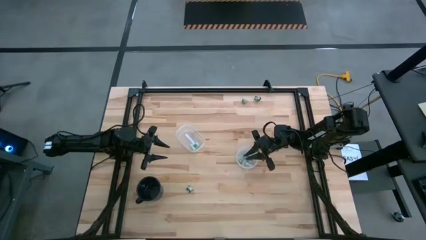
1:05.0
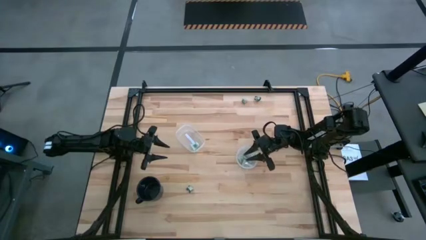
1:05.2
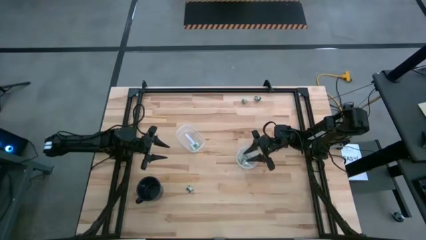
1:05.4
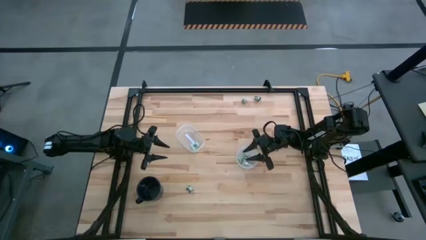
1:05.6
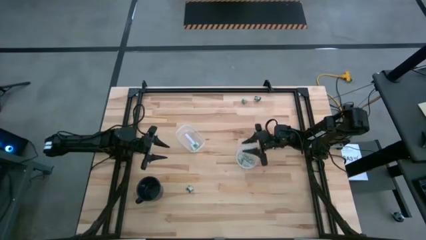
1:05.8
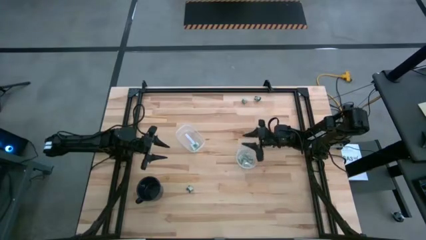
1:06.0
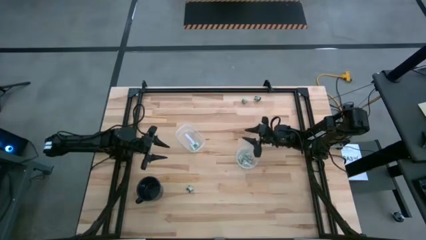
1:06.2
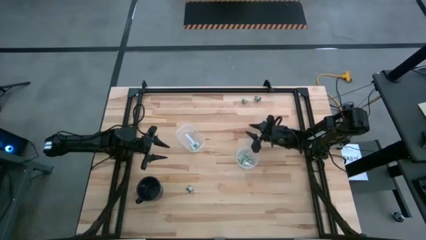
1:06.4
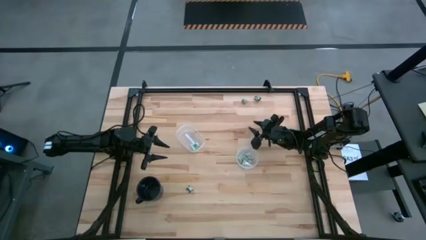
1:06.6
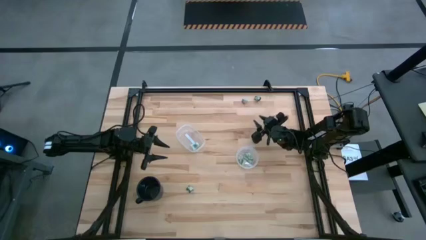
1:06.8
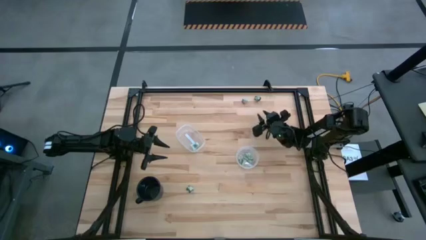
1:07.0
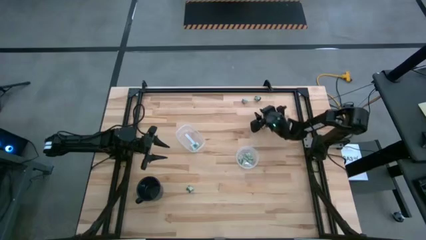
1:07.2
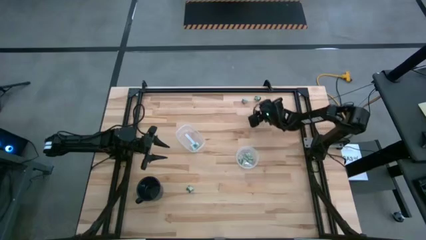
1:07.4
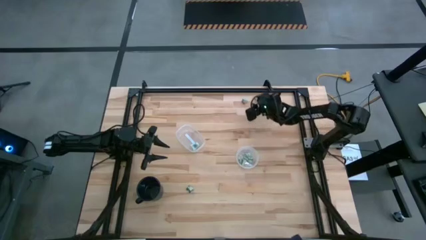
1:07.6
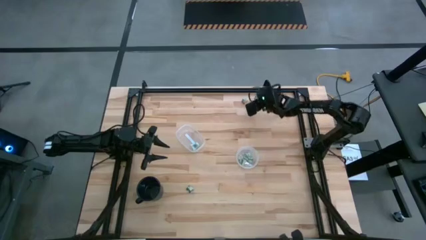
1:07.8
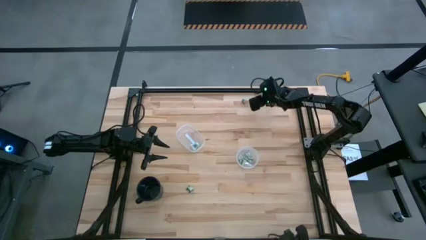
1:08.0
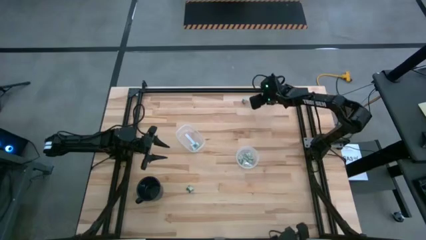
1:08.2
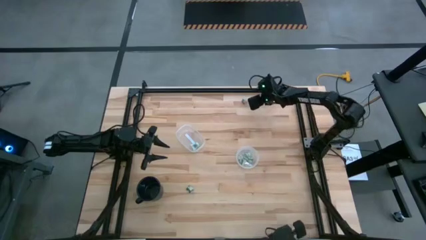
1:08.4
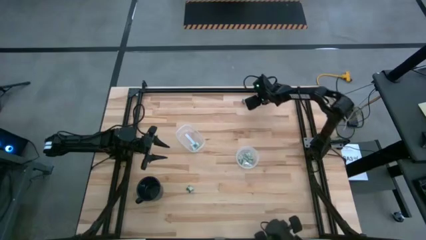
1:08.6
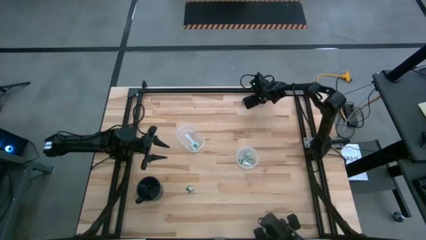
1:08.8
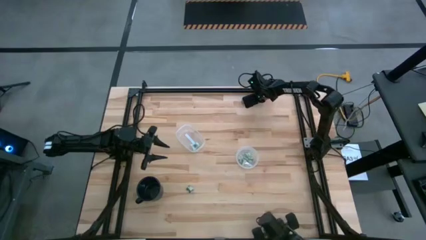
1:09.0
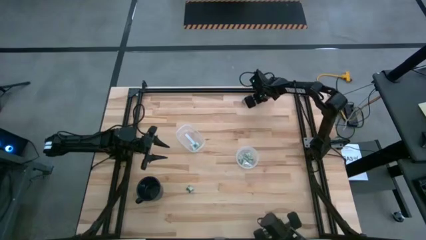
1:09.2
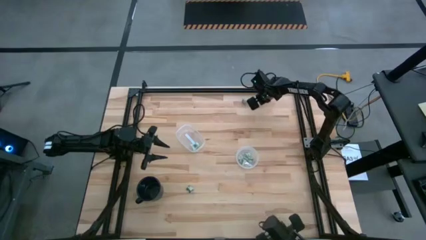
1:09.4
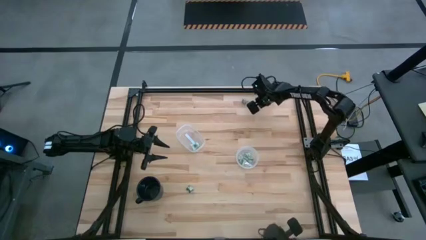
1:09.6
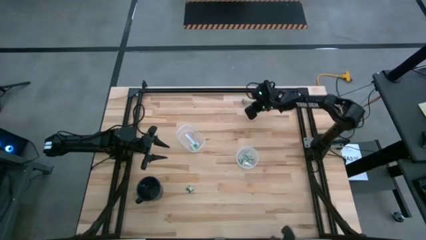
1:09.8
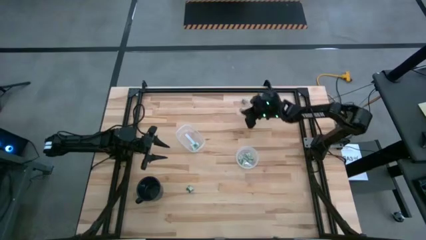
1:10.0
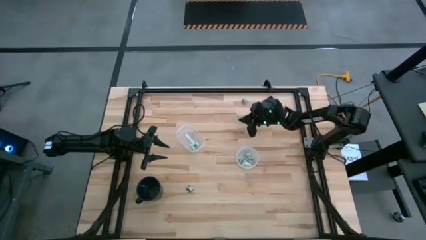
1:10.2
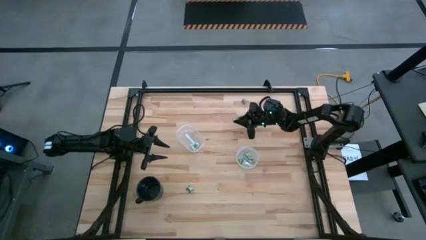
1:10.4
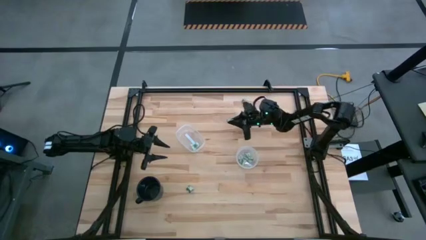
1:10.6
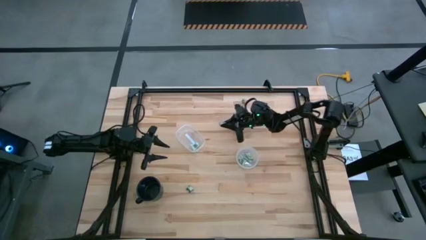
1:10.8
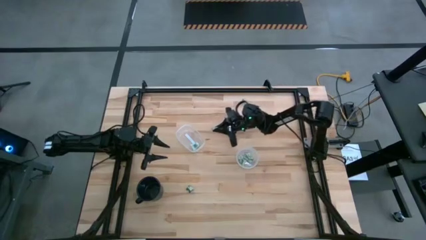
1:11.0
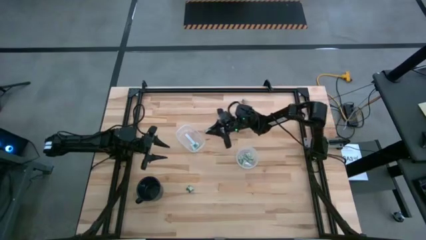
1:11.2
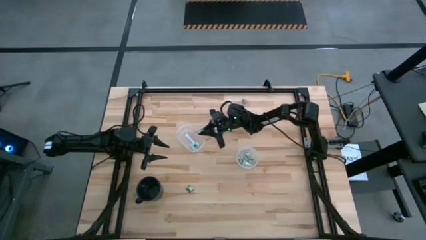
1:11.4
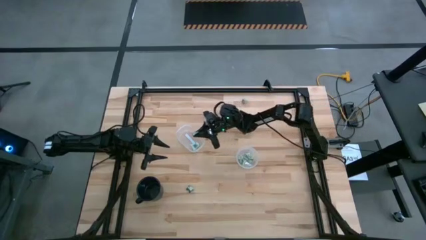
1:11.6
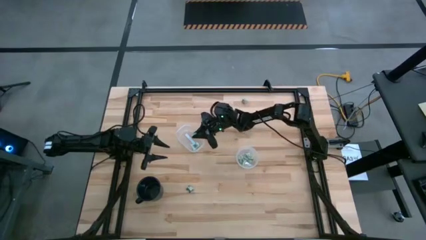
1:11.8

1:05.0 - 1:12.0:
Task: Pick and place Stevia / Truvia into bins
Put the top green stevia packet into the left transparent container

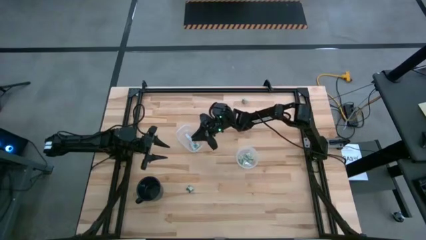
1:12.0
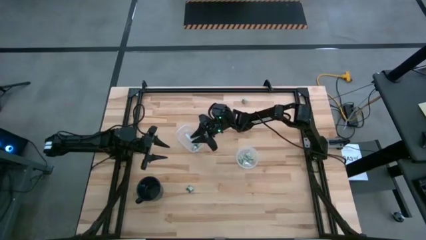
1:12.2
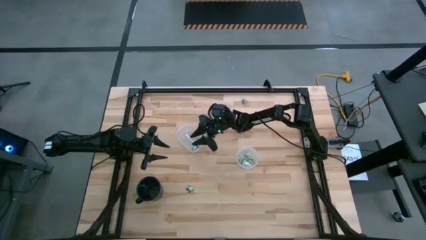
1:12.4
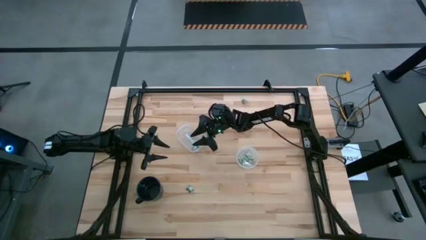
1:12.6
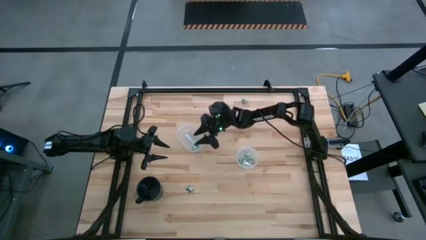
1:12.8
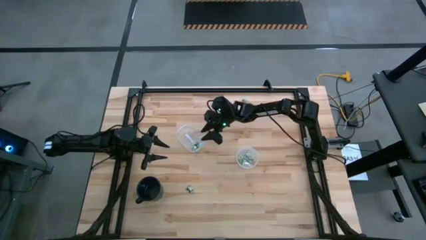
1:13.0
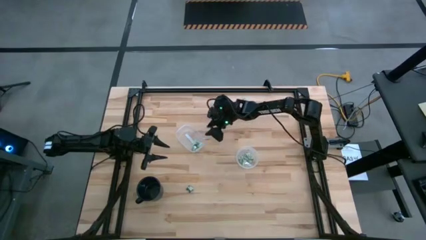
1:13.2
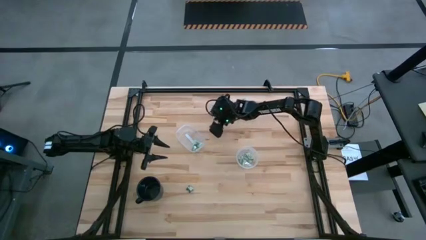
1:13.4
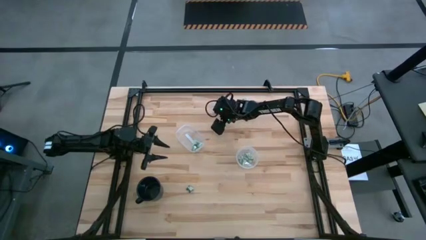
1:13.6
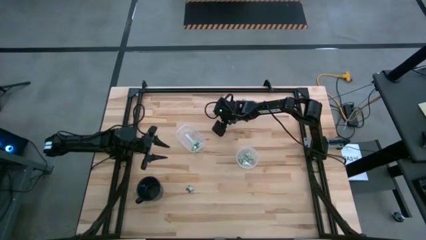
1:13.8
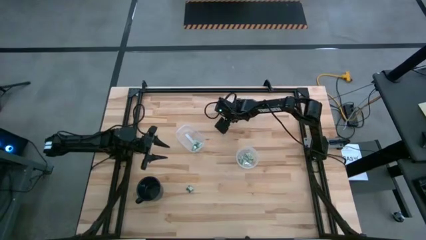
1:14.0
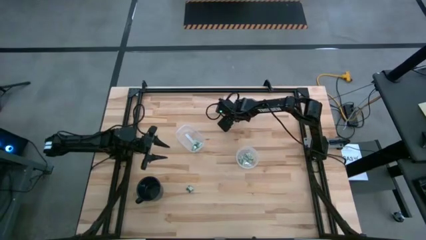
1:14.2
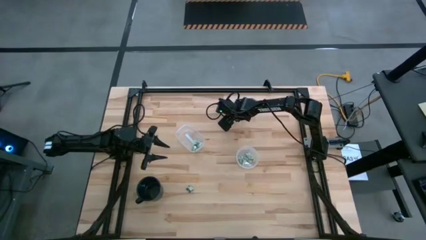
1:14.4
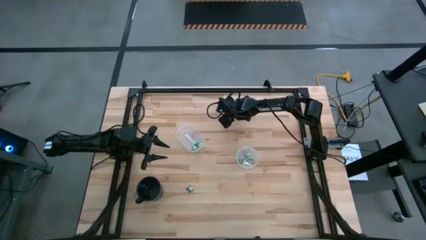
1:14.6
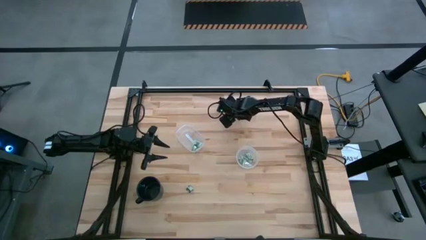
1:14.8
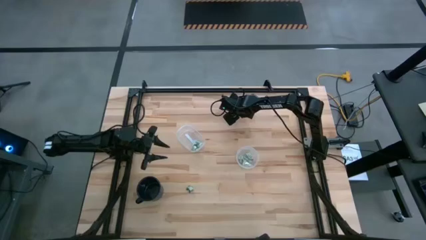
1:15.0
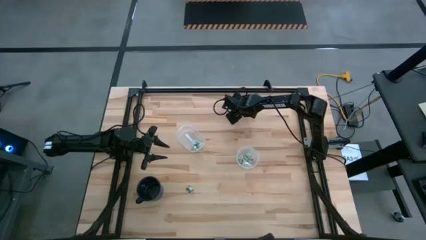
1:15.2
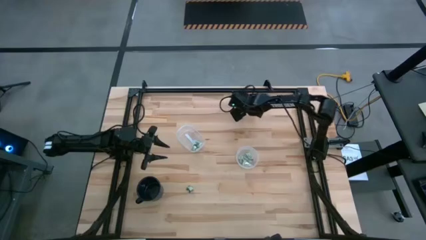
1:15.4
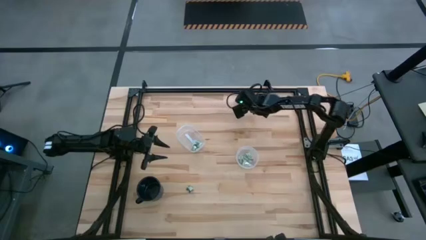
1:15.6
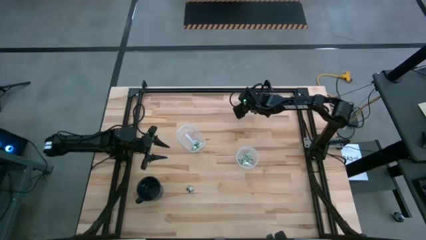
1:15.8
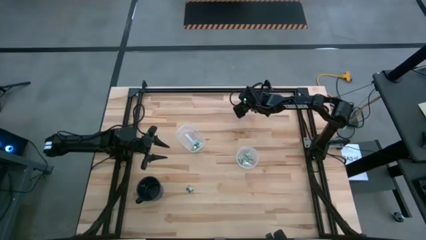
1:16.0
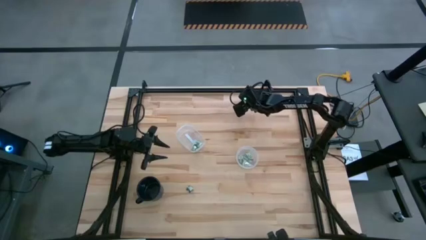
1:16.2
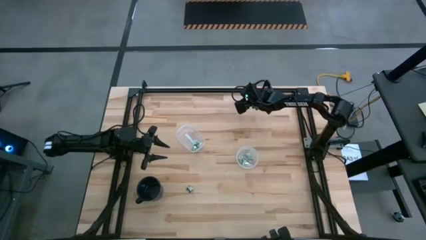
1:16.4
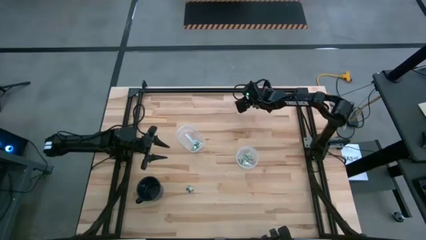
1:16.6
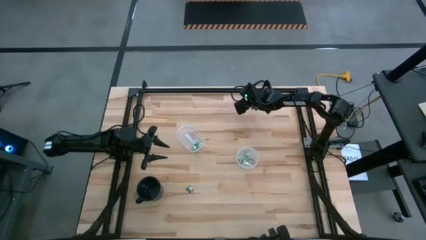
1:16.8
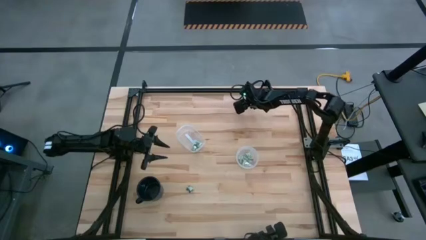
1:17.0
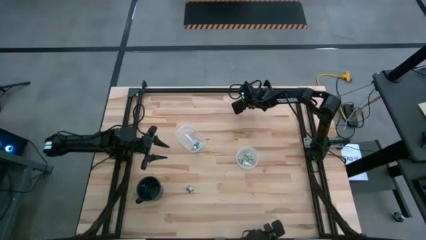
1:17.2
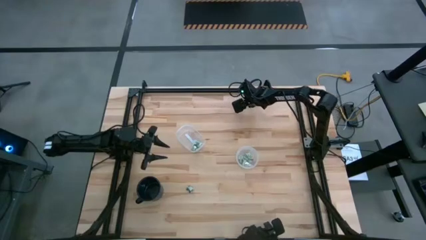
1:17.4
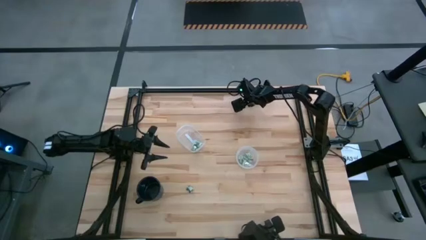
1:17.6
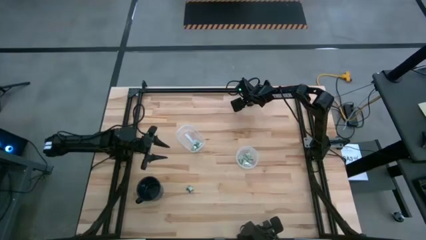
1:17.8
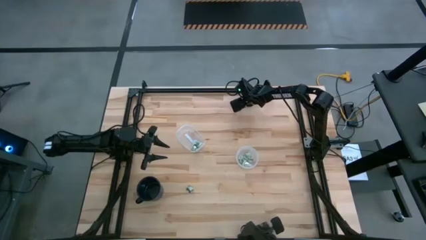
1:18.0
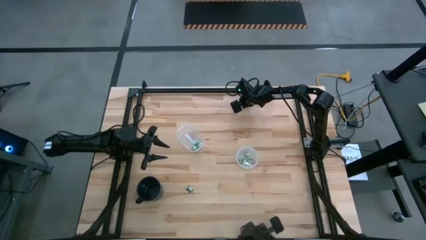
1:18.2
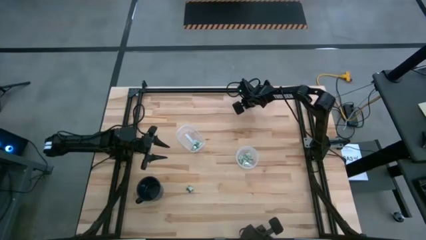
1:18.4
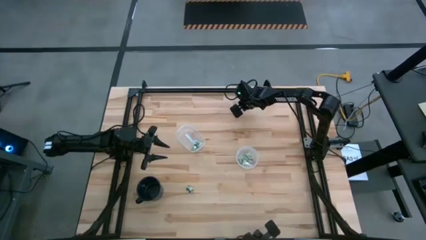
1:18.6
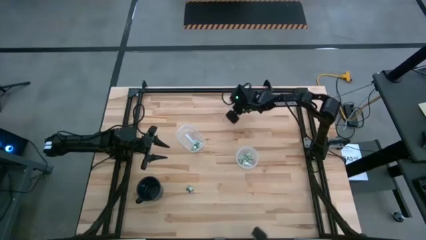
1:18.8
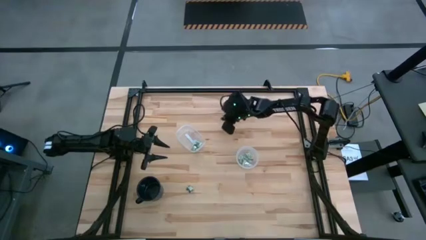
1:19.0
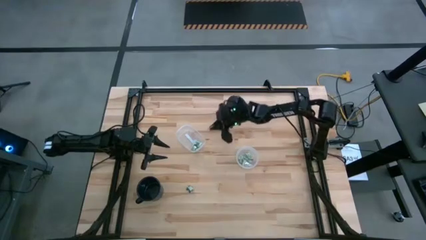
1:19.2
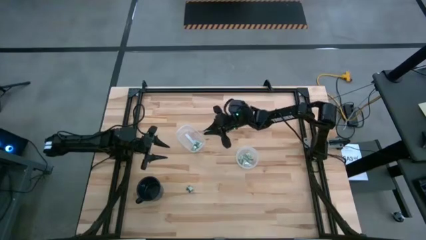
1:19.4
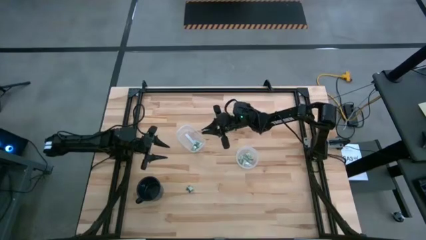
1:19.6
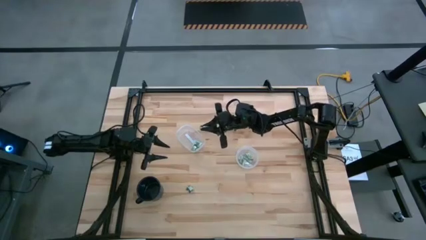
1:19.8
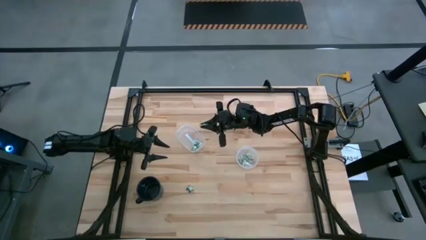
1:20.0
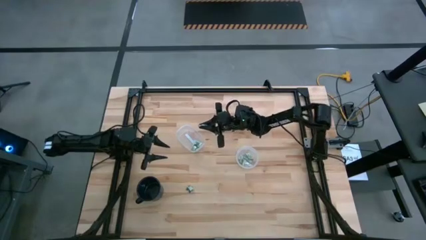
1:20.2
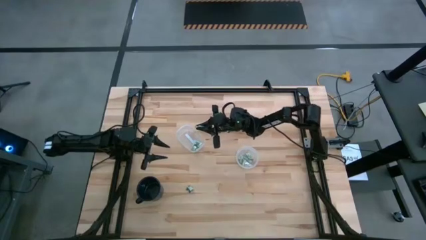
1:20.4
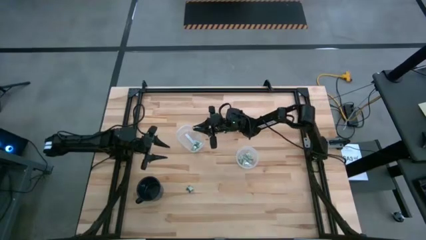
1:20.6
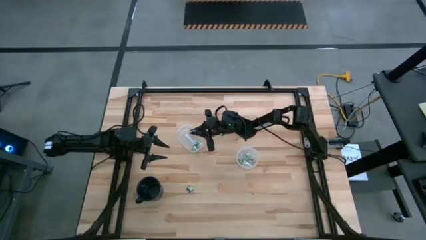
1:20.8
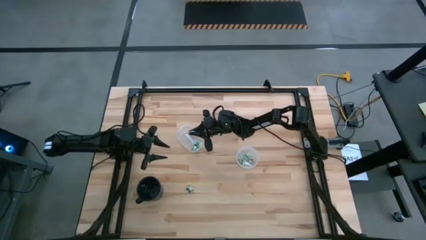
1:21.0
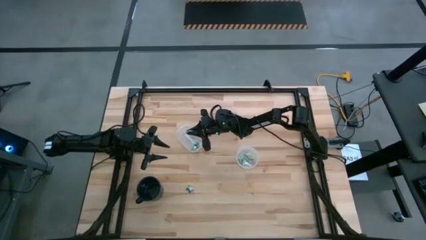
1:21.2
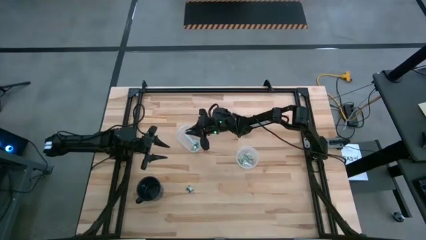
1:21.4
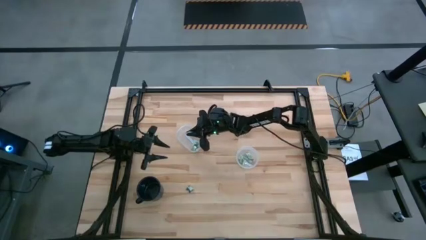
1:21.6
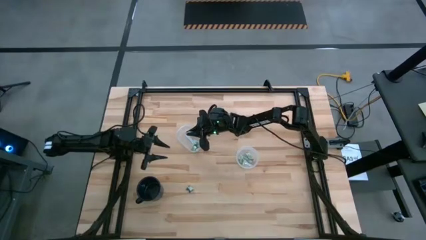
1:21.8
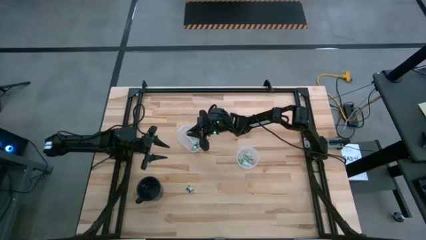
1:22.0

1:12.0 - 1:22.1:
Put the white stevia packet into the left transparent container
